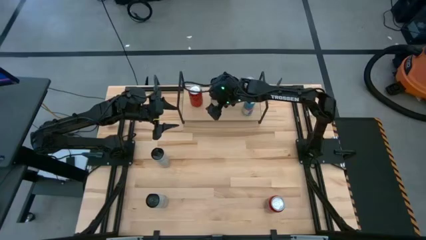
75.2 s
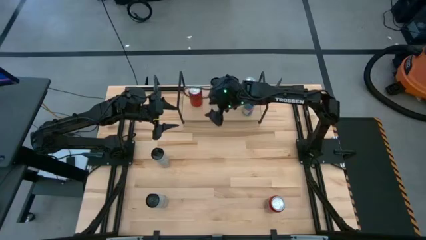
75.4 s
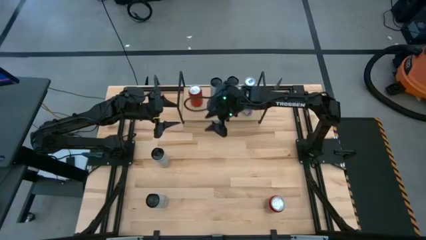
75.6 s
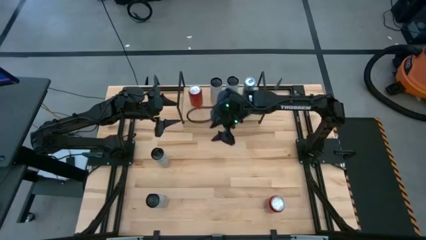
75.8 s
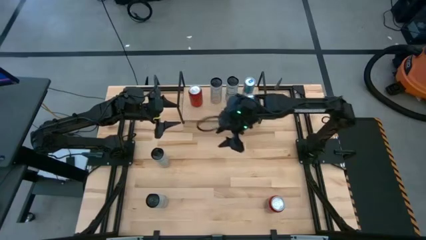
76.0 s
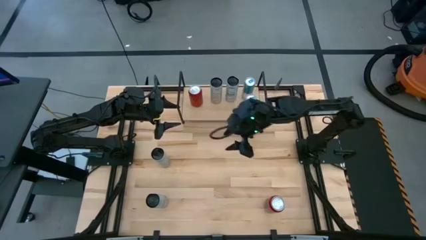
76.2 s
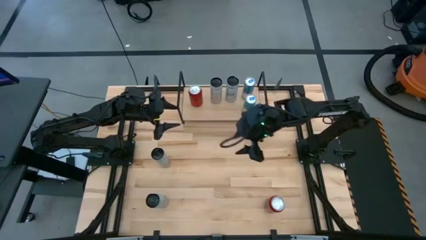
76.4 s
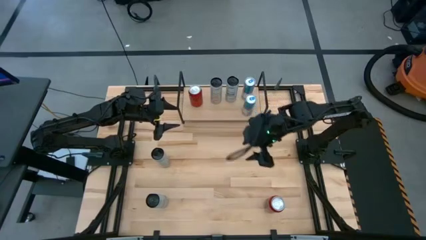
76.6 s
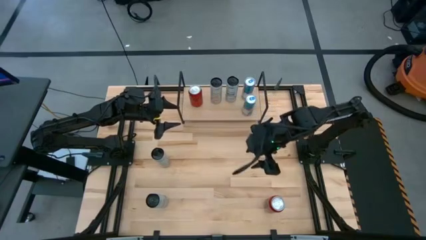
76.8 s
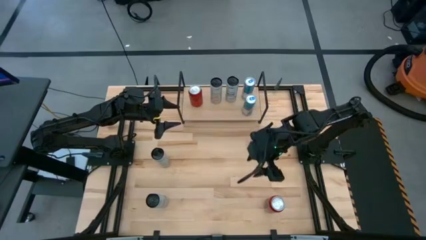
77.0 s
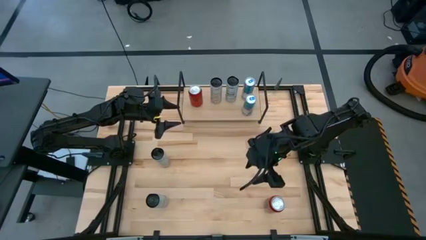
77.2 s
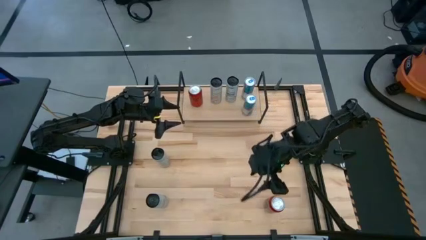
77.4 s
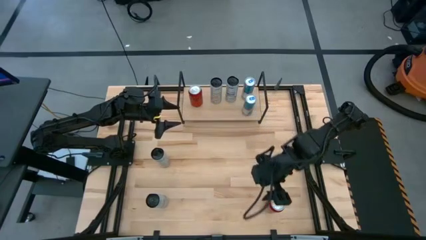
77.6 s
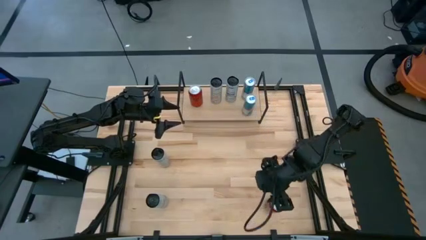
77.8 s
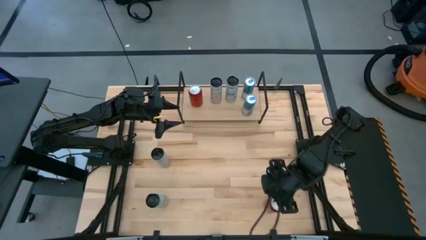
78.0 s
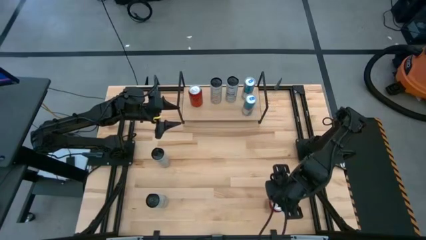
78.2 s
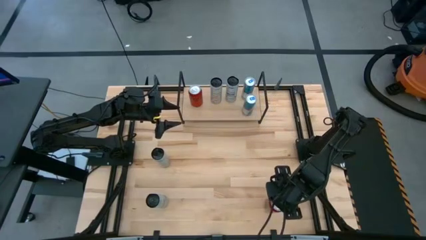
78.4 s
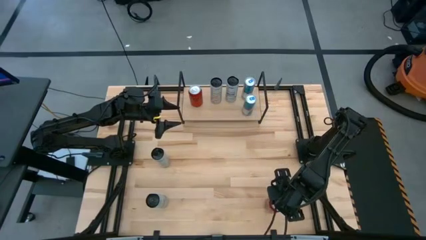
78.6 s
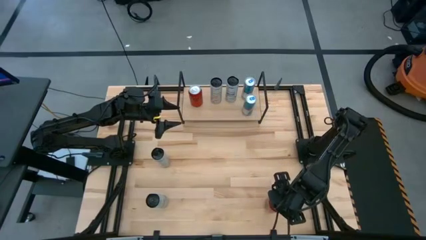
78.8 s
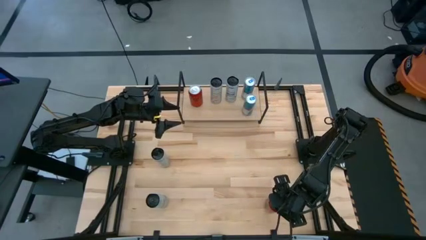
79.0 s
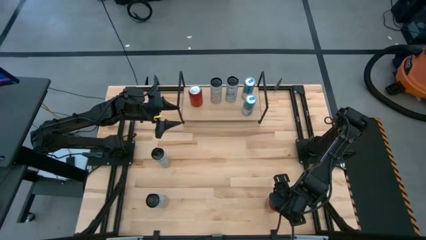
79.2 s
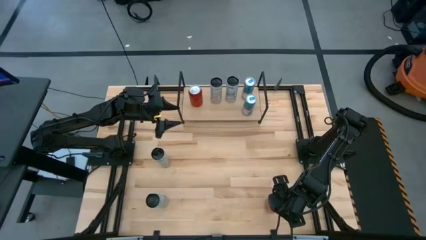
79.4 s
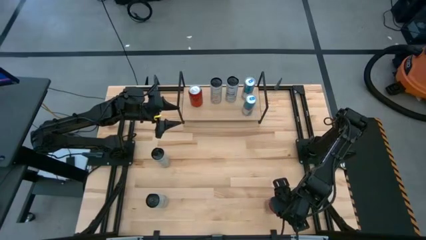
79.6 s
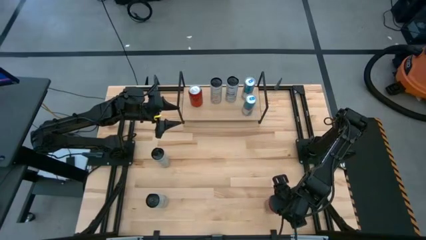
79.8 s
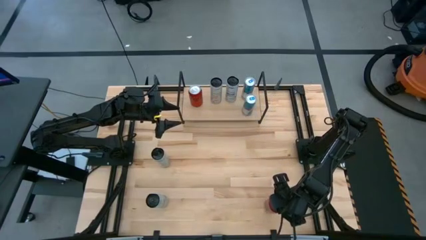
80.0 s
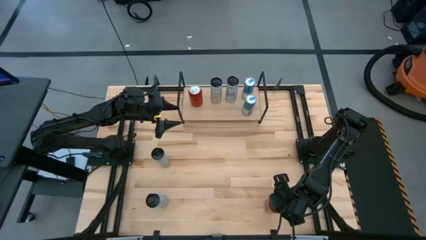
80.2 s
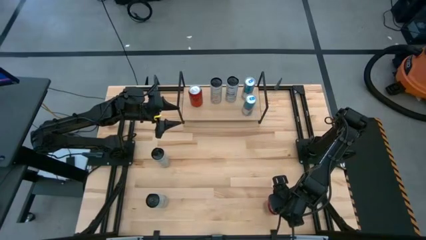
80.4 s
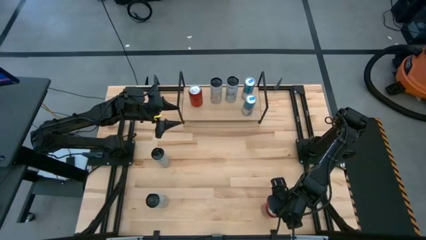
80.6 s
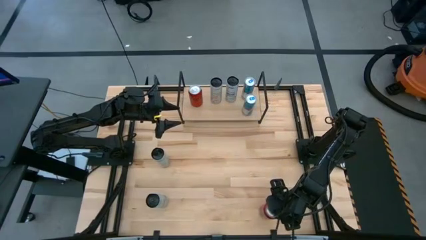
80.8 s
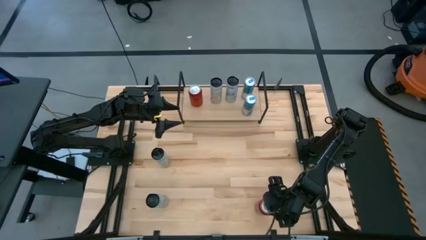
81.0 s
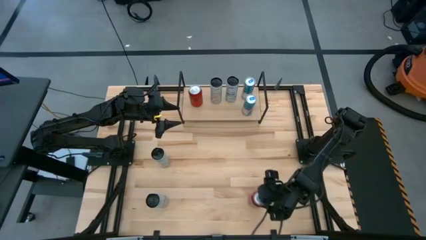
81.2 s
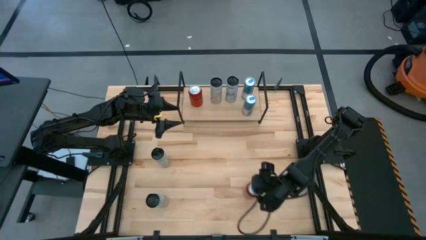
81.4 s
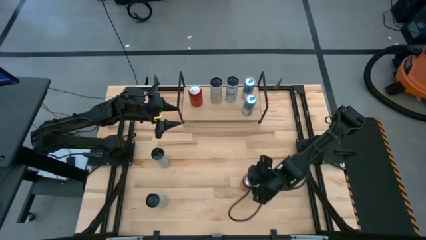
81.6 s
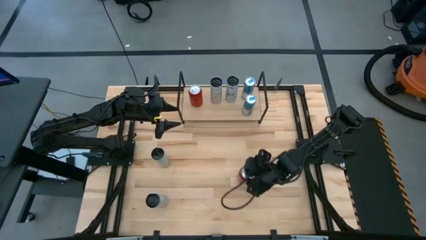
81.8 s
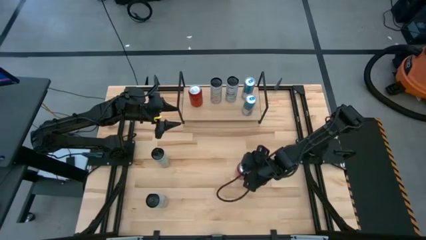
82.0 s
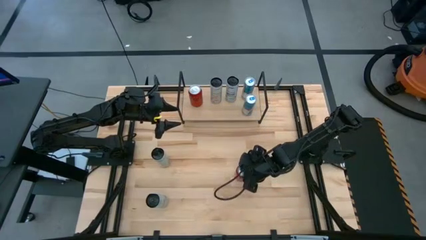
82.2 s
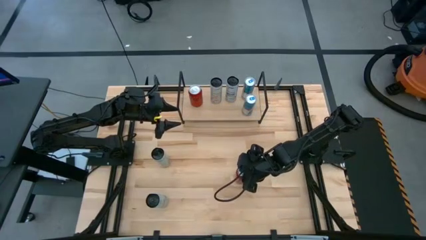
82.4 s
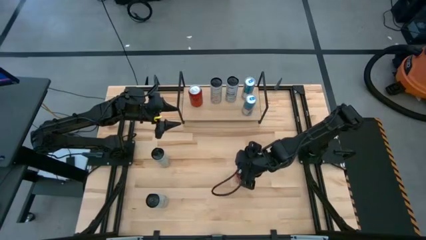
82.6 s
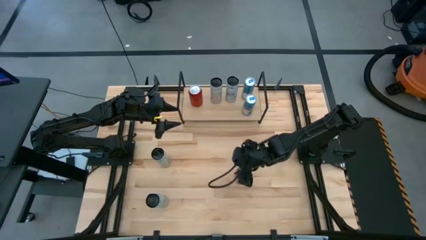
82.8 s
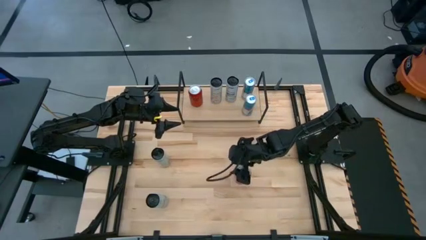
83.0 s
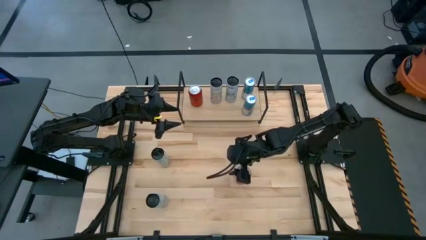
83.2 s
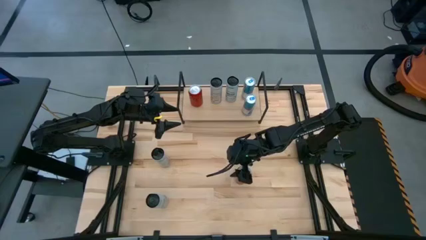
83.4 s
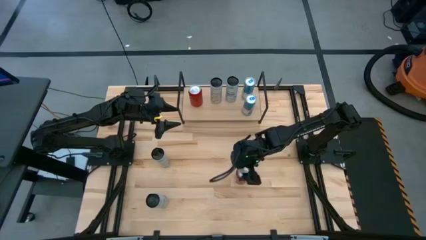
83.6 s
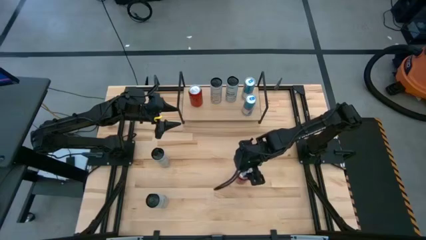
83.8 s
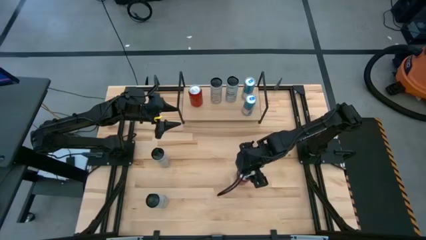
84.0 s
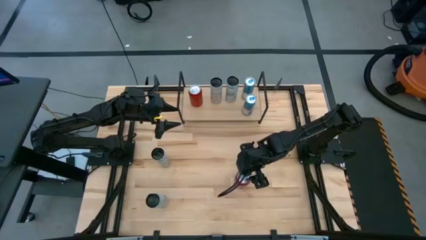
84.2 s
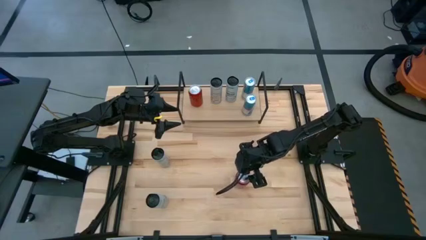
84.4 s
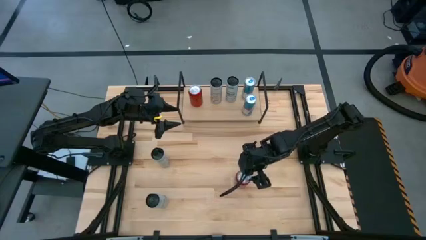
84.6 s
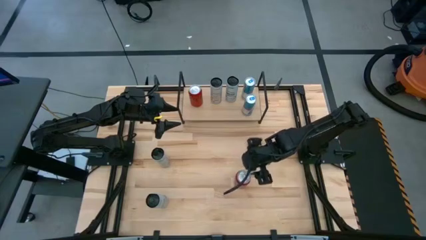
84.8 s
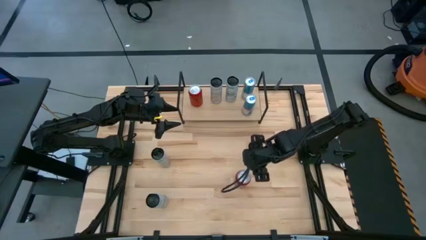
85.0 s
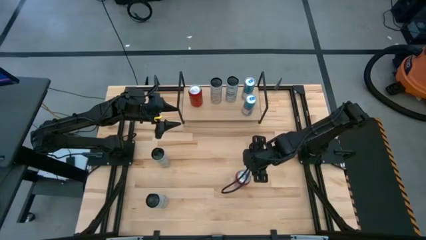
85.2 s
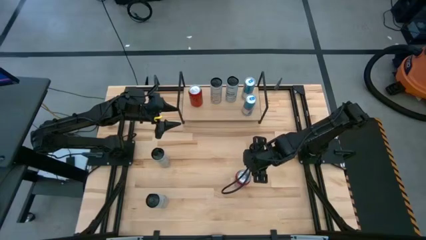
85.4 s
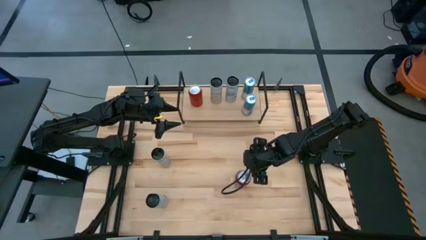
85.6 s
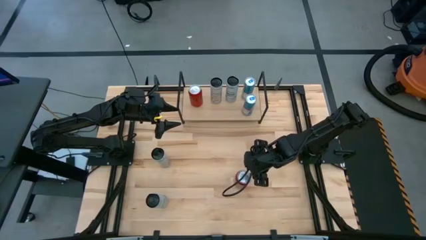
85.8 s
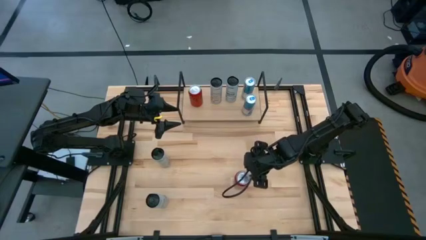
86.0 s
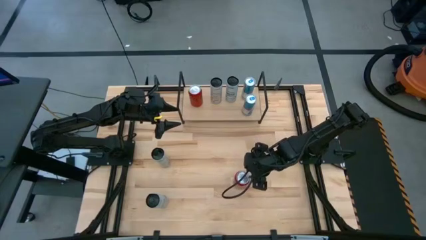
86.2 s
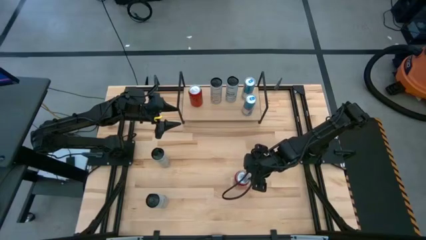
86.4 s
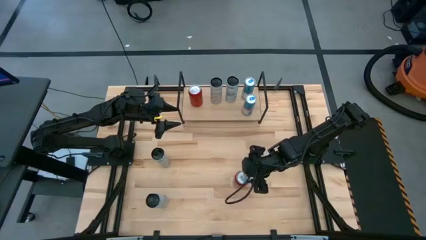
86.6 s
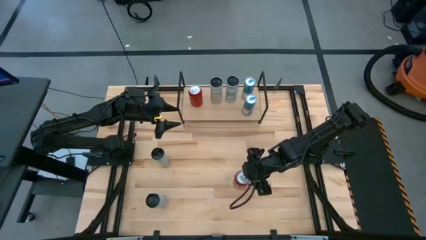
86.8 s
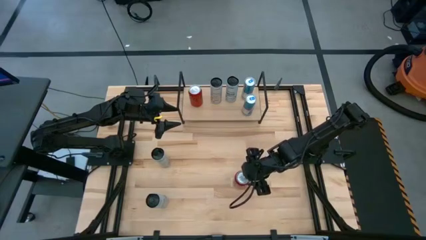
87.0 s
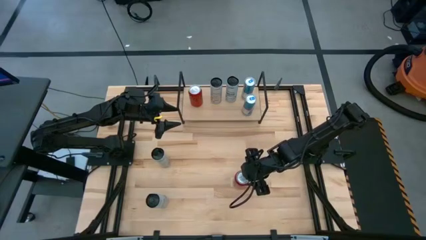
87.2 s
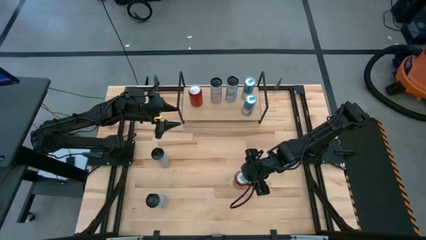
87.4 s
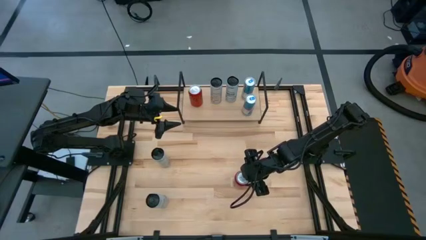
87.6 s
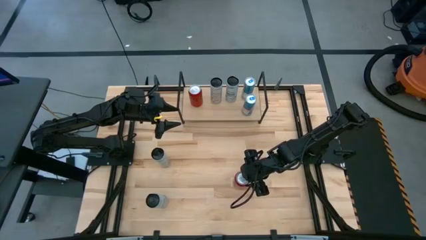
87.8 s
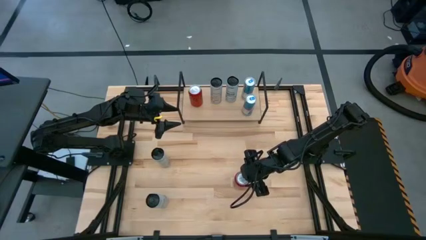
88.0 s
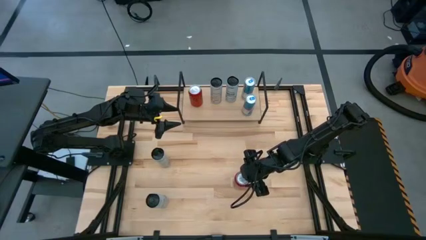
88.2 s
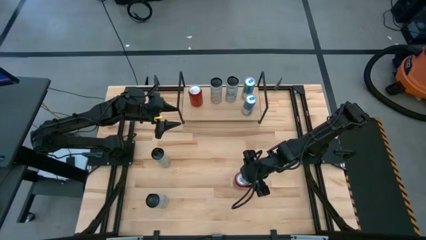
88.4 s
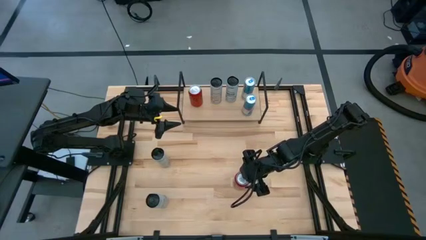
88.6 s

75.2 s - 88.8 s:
Task: Place canned beverage on shelf
Put the red soda can on the shelf
